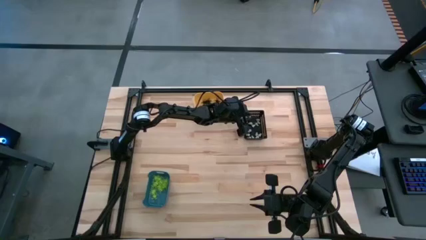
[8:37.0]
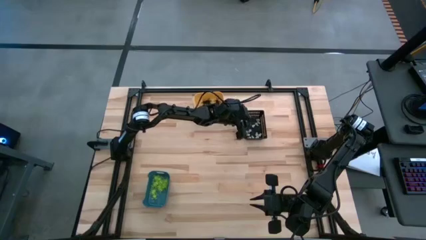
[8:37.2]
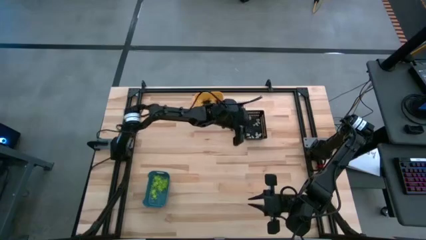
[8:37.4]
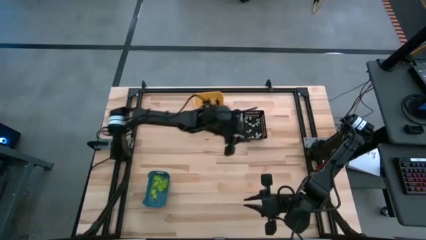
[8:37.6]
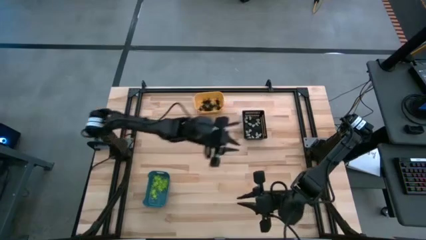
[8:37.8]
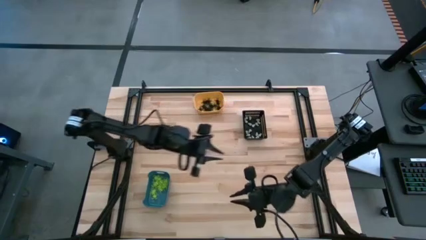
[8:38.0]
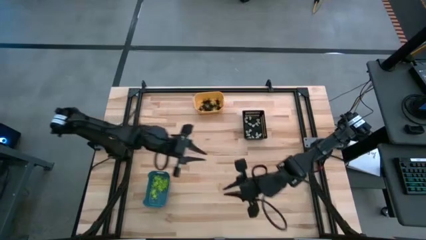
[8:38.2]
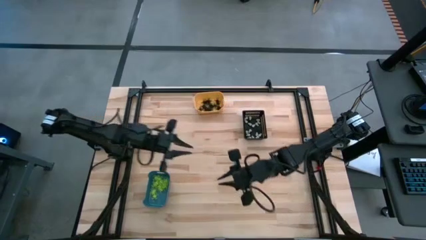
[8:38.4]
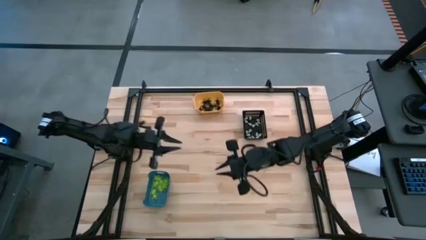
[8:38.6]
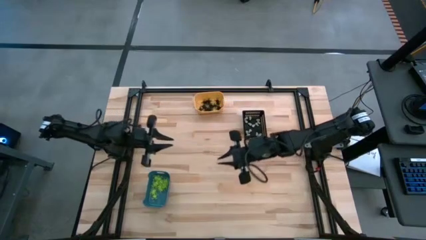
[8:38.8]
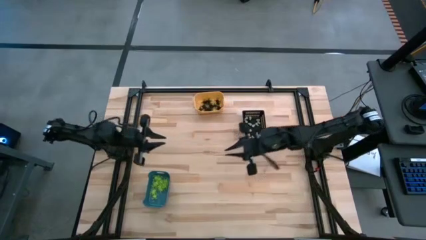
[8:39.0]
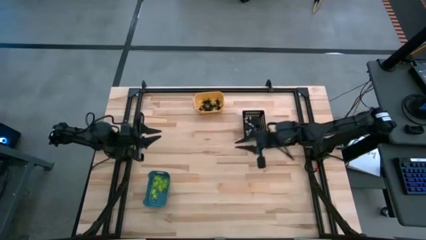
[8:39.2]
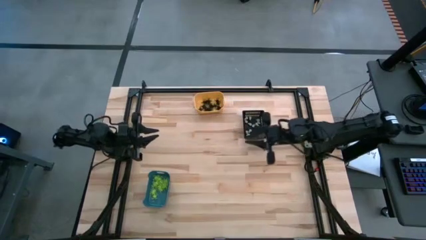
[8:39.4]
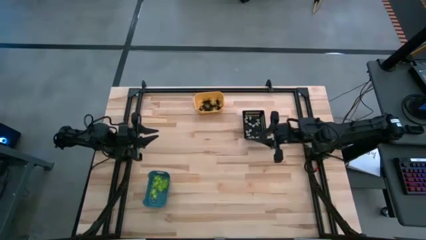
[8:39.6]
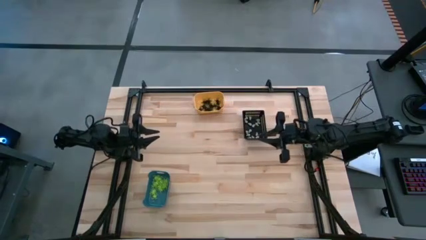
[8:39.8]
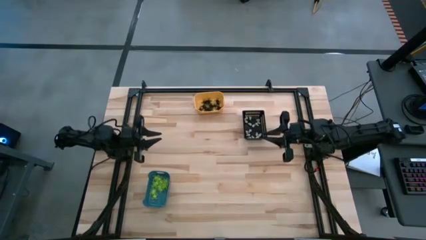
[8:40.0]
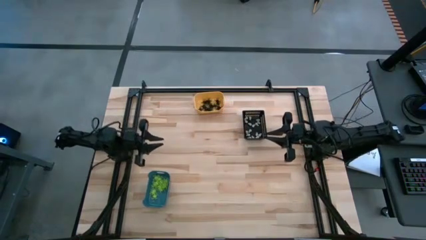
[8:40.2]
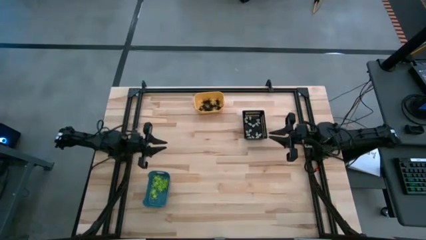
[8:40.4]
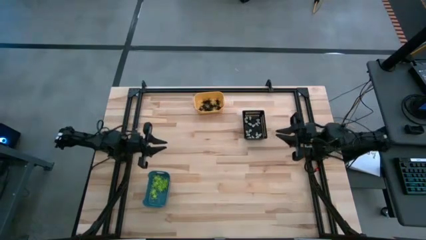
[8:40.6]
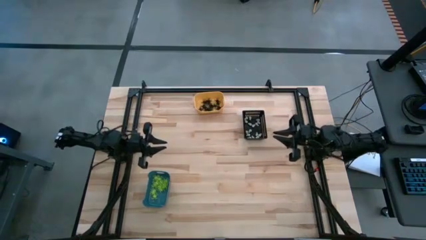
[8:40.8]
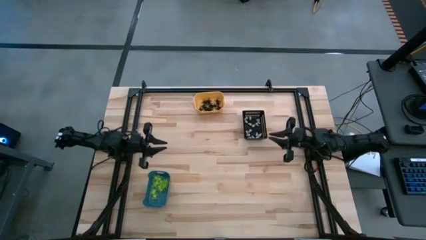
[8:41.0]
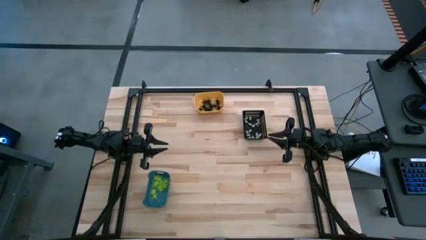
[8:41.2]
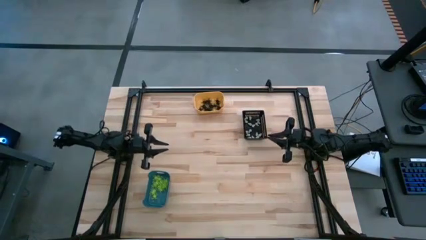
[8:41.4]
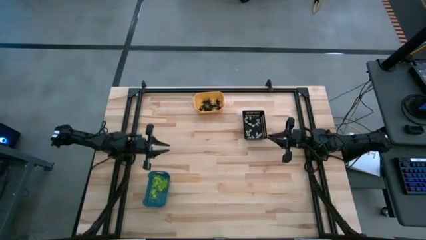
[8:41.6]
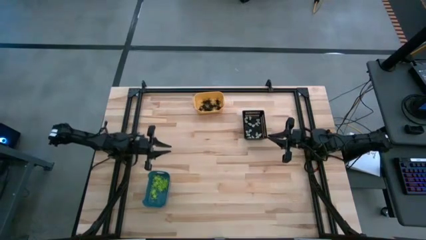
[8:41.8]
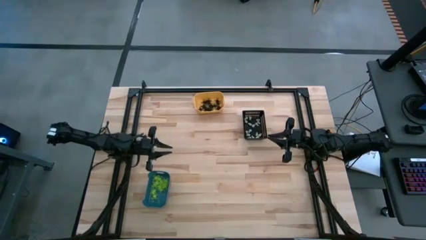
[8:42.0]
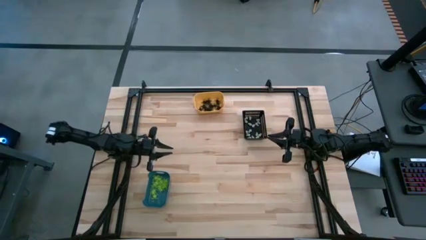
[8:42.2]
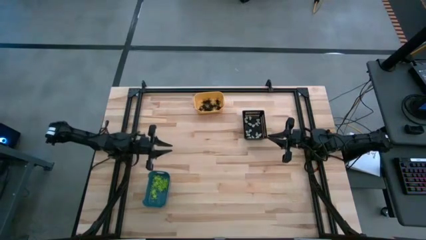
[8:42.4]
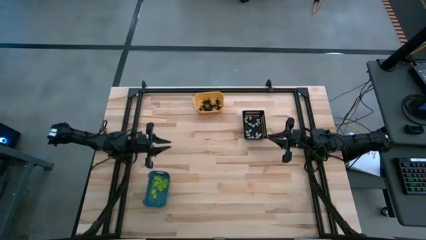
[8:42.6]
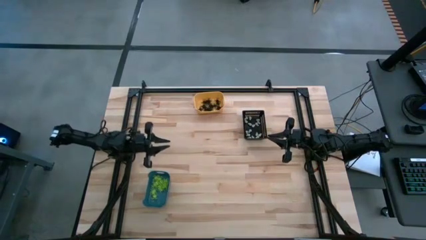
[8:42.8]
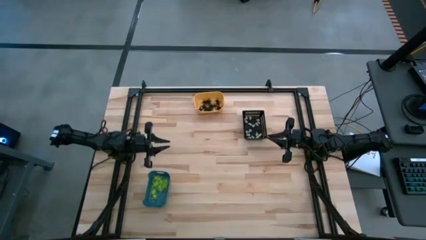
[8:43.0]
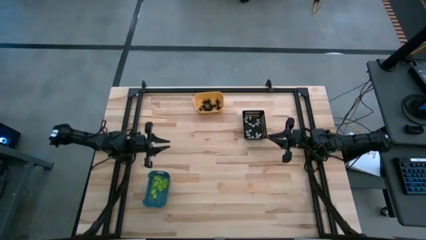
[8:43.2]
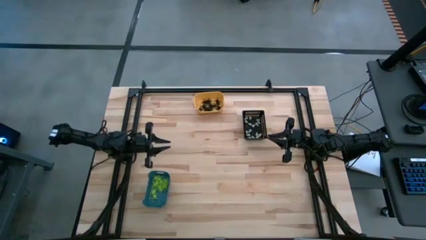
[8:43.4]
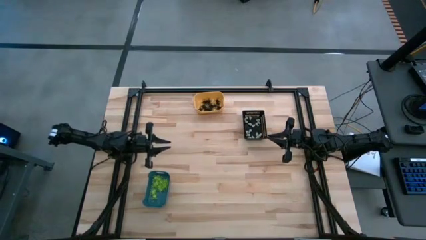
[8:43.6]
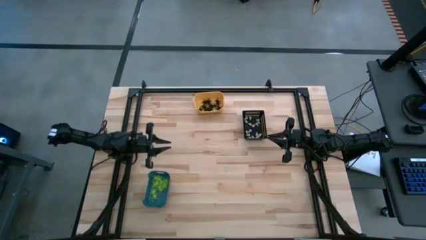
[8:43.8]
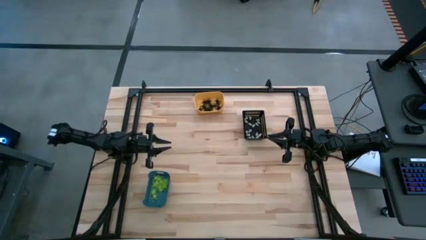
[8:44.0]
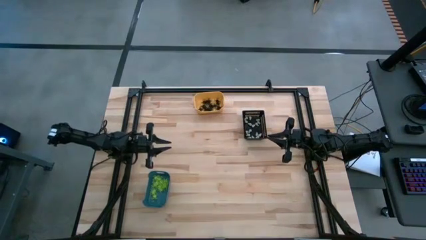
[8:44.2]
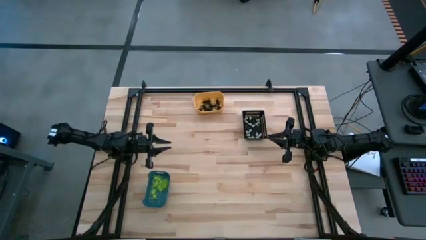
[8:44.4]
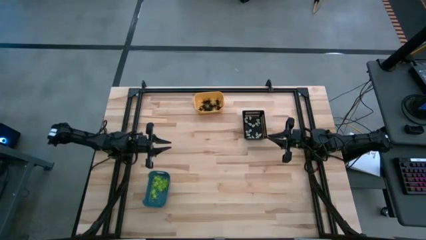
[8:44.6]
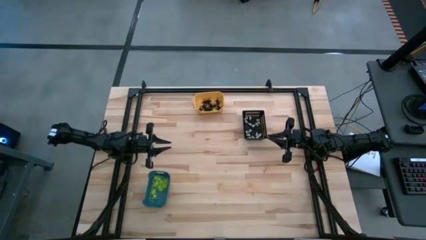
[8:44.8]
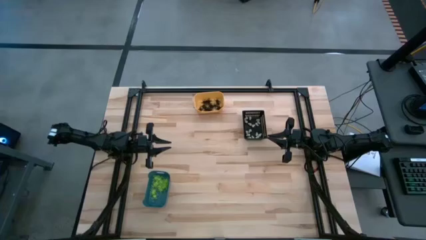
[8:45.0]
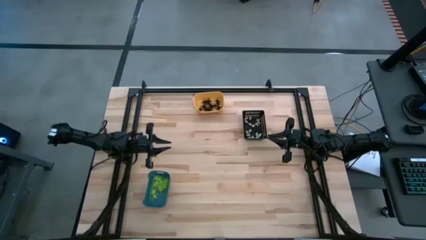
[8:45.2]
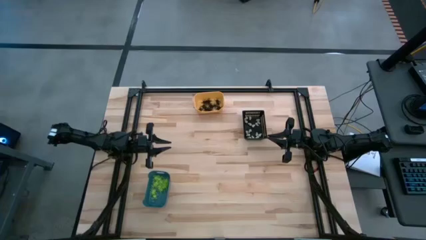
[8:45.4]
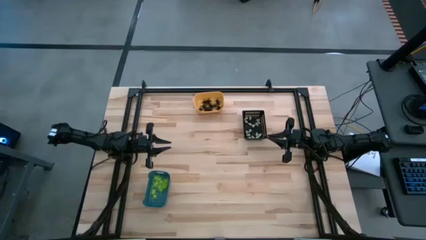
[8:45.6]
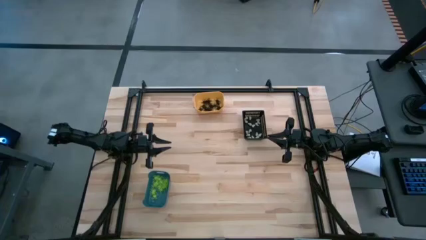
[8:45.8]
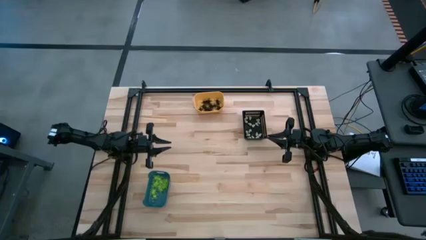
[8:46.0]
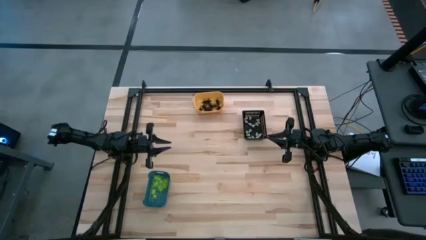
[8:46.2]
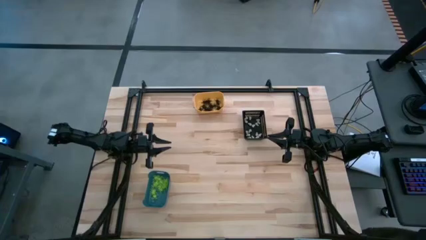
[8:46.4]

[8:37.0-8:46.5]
Task: Sort Halloween decoration
Return to Home Position

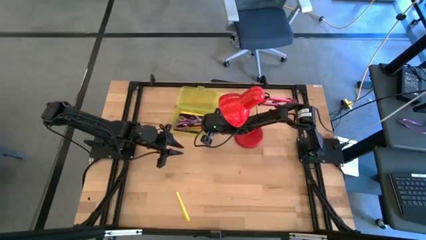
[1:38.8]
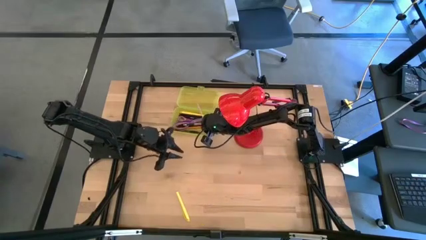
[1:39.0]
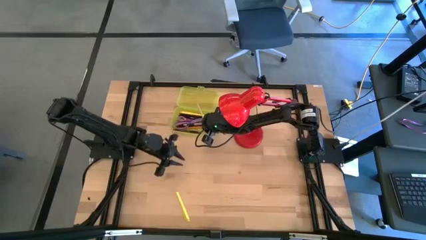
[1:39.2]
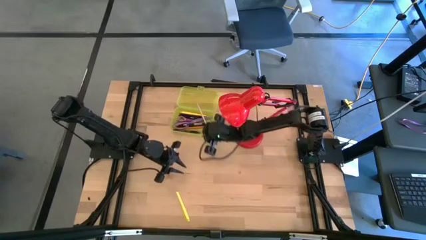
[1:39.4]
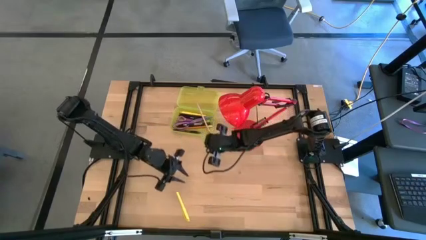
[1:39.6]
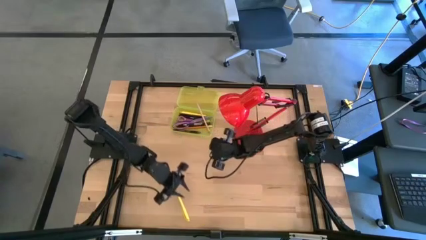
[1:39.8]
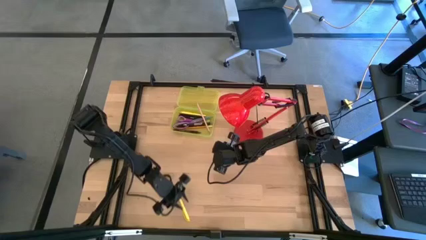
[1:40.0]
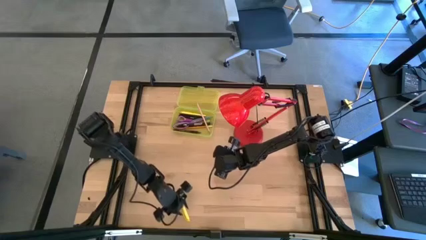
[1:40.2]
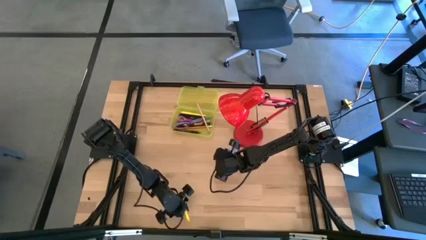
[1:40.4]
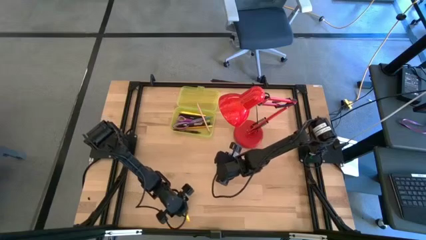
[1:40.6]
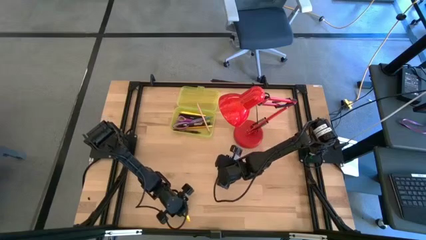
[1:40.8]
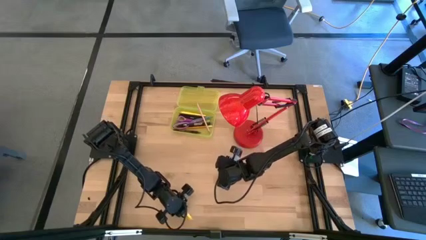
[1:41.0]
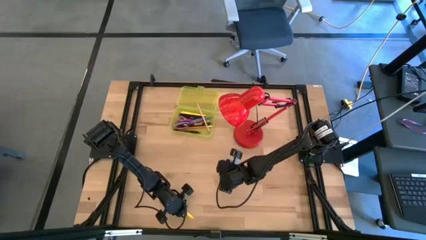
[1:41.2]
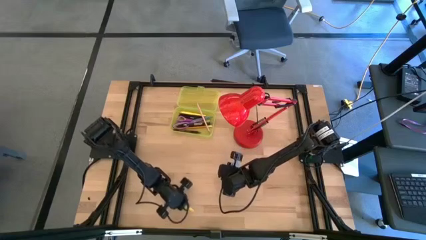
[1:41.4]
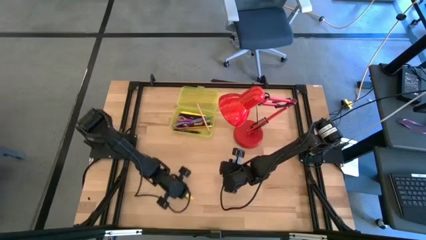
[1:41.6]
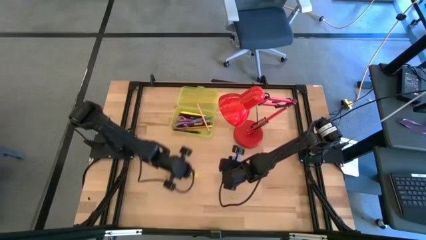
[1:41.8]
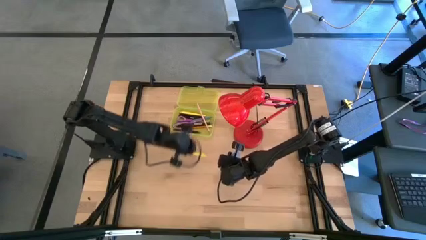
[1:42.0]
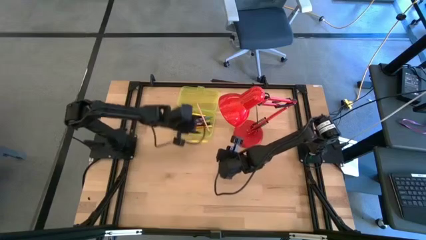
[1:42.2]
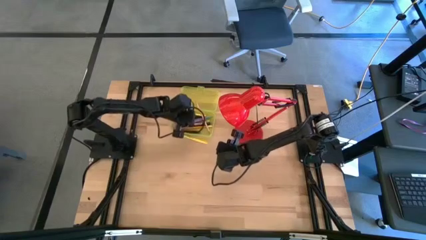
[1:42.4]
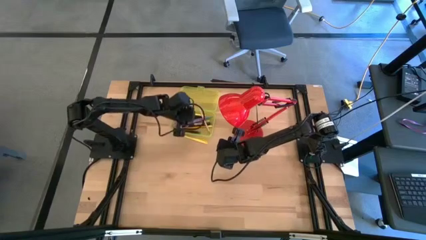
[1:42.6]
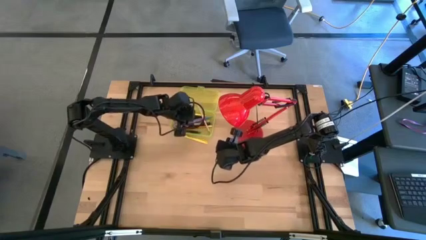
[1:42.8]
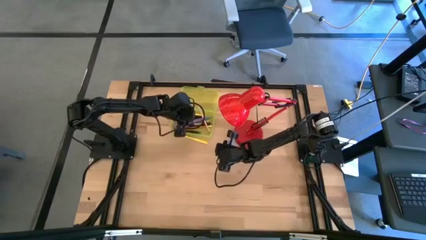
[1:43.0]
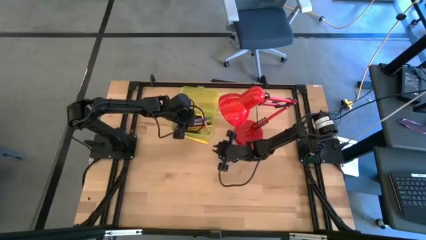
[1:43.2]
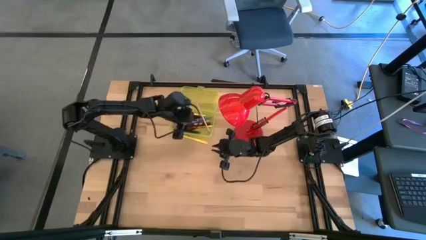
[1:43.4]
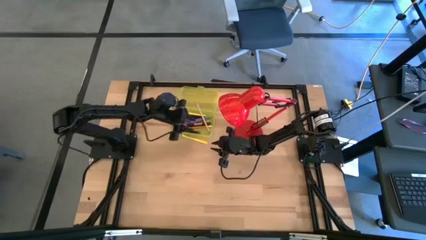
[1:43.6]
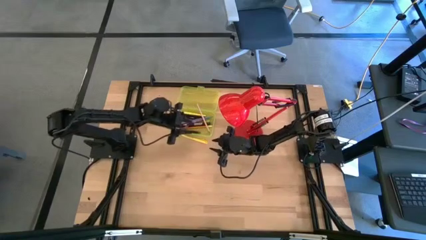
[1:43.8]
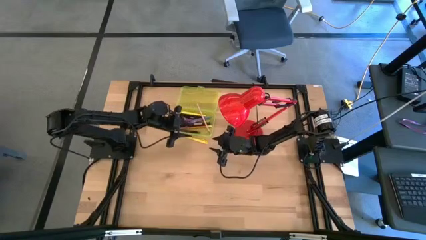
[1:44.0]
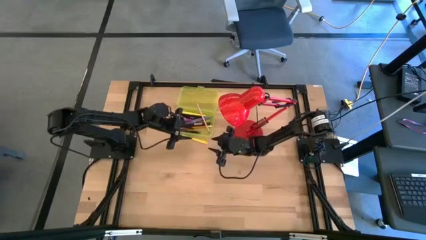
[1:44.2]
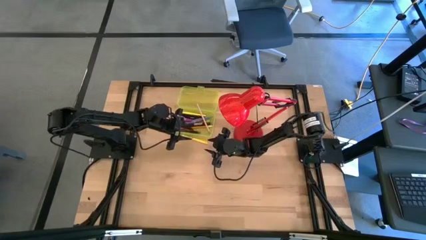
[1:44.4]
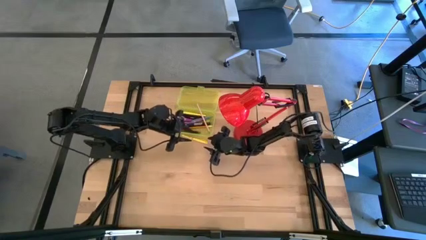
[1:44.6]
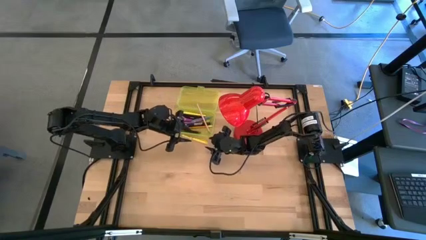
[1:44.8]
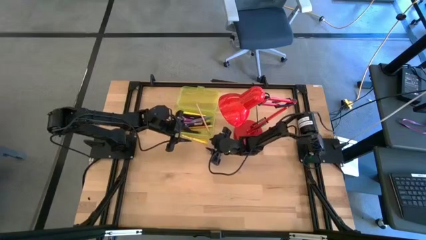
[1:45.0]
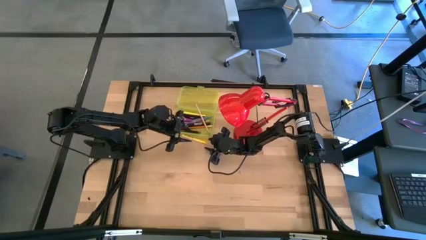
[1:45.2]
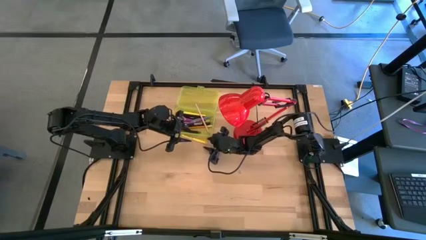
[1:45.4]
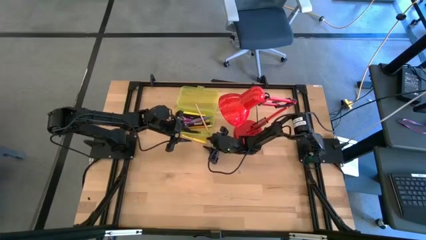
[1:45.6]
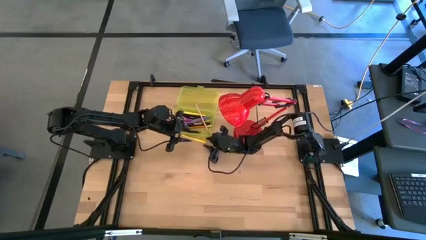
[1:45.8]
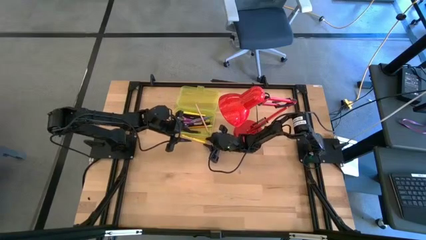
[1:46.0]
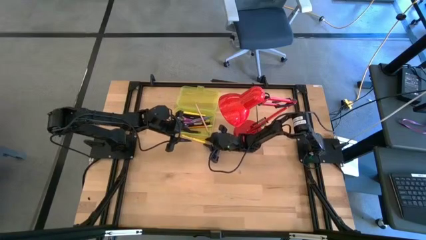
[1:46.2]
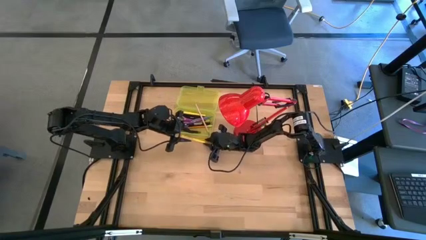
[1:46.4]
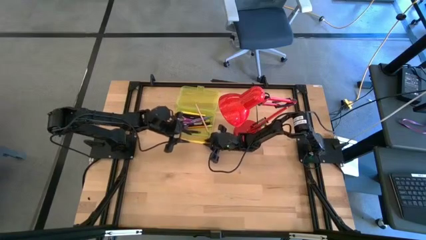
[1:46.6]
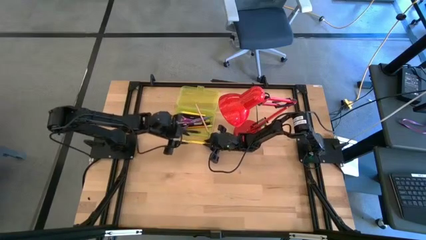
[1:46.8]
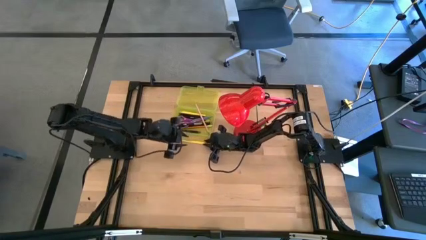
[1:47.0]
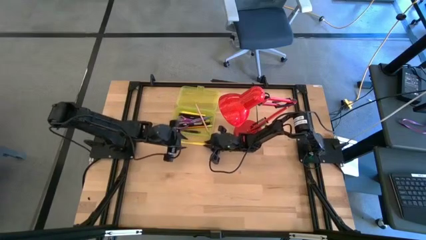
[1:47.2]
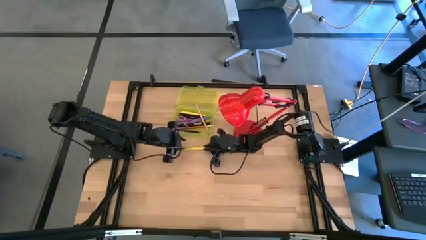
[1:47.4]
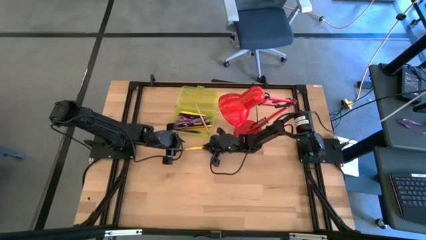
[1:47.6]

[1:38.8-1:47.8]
Task: Pick & place school supplies into a supply box
Put the yellow pen into the yellow supply box
